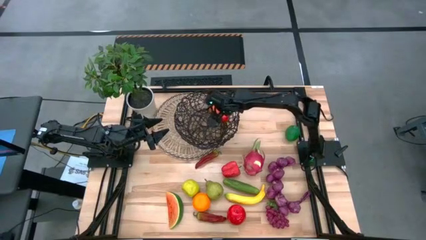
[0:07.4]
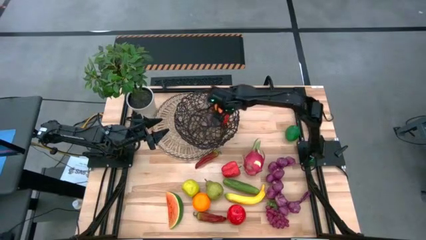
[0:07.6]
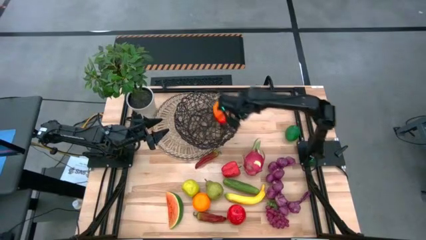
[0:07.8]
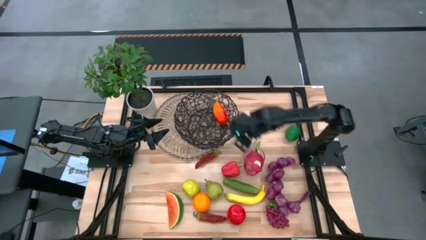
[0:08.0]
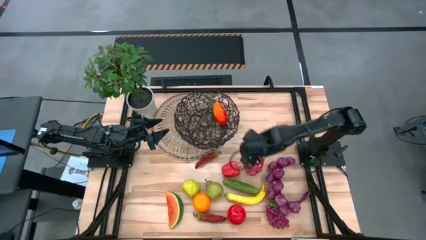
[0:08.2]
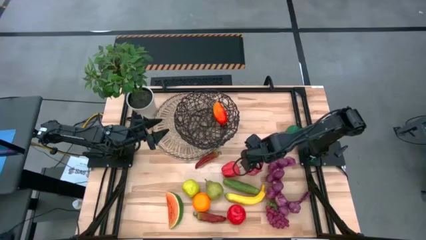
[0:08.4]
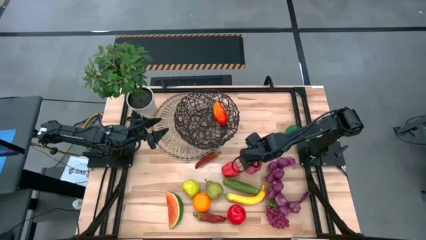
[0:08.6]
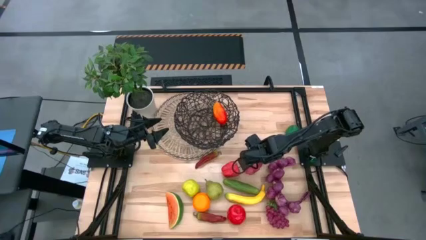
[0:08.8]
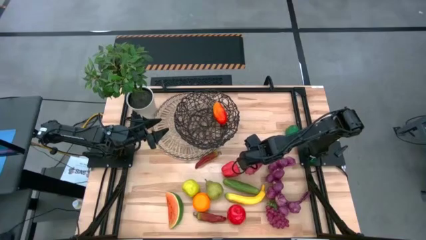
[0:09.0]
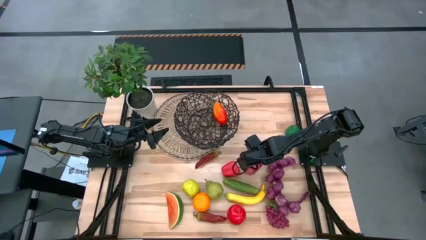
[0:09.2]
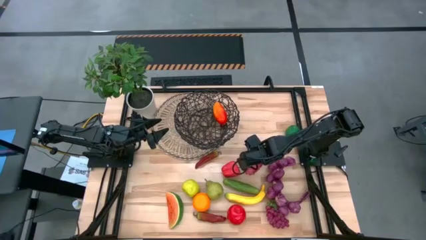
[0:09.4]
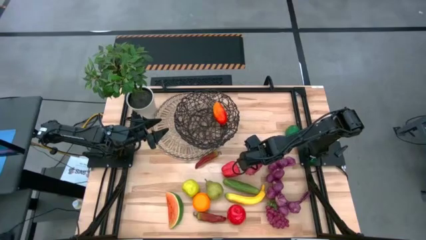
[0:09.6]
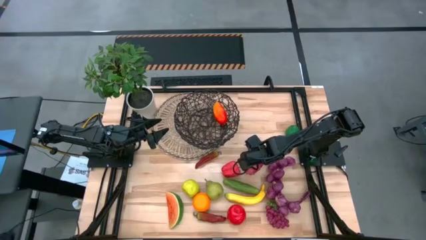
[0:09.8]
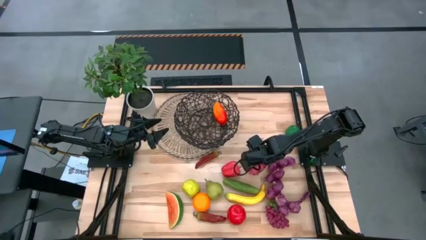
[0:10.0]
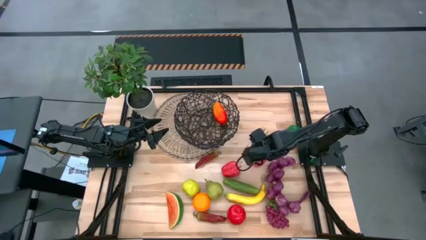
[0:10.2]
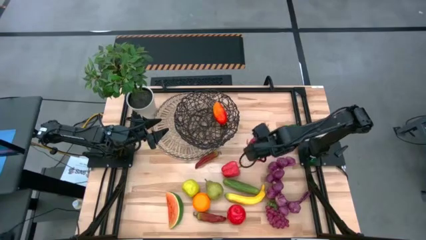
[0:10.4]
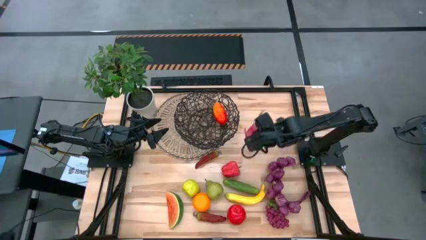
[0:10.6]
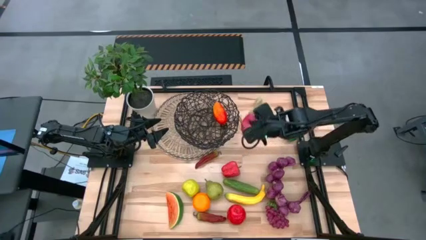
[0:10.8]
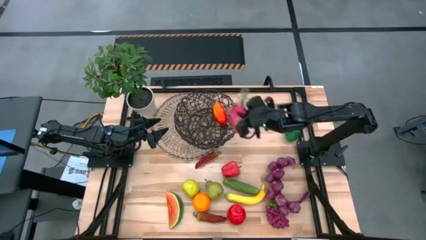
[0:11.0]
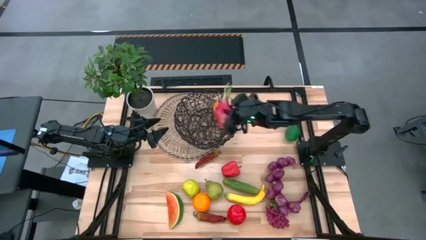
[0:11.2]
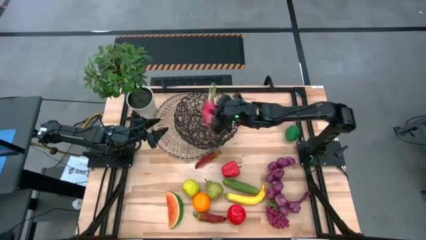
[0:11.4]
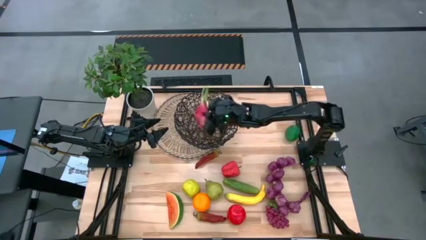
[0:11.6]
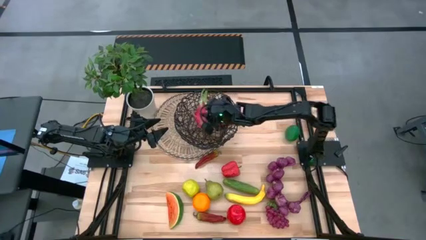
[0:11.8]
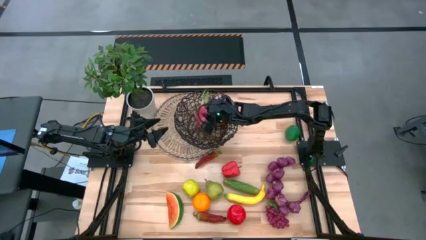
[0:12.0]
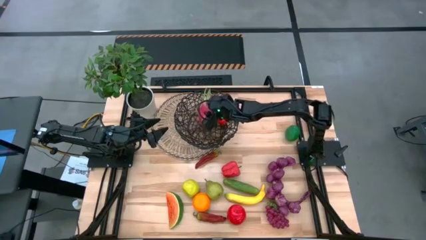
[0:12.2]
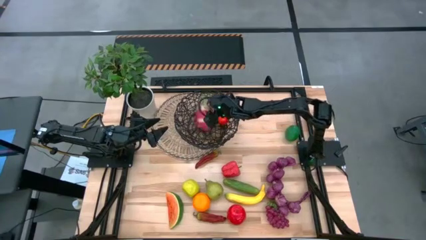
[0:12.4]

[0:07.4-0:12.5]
Task: Build produce basket
Put the dragon fruit into the wire basket

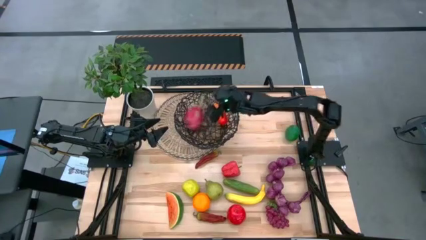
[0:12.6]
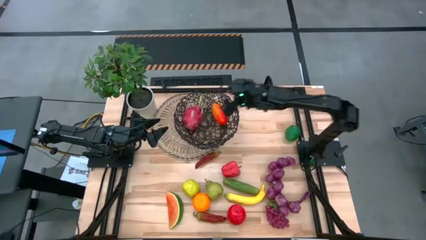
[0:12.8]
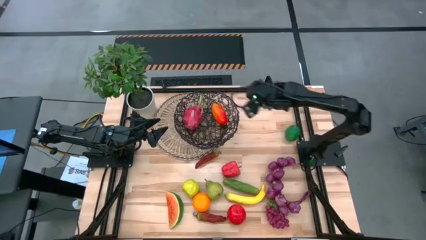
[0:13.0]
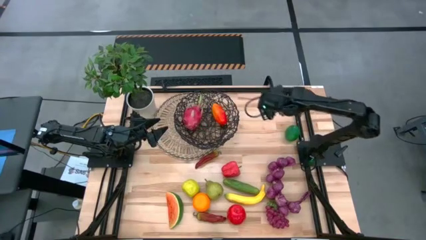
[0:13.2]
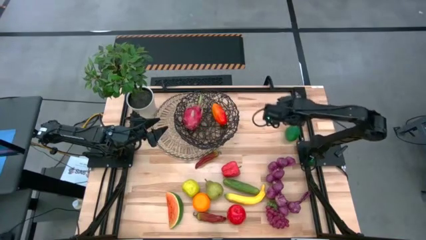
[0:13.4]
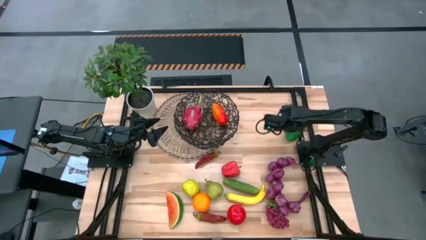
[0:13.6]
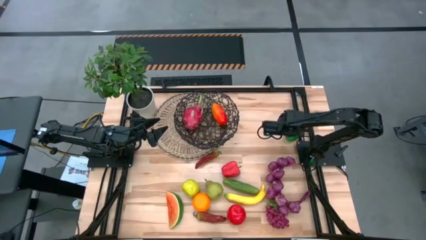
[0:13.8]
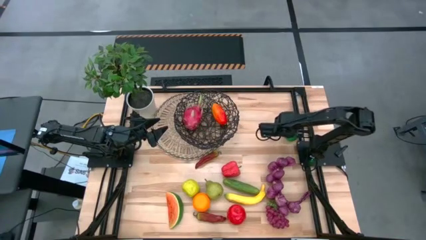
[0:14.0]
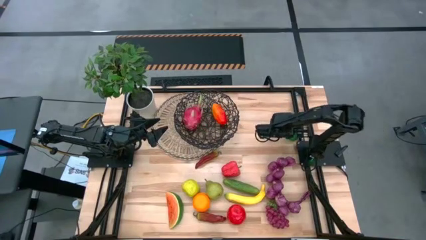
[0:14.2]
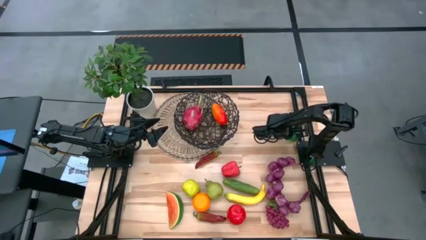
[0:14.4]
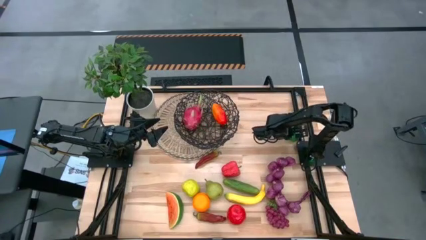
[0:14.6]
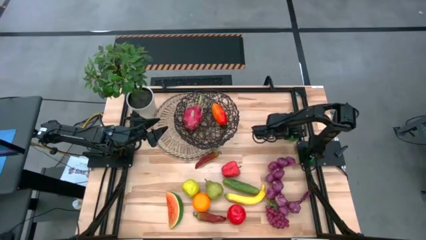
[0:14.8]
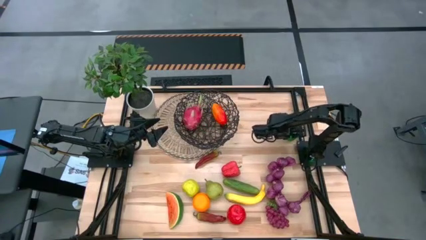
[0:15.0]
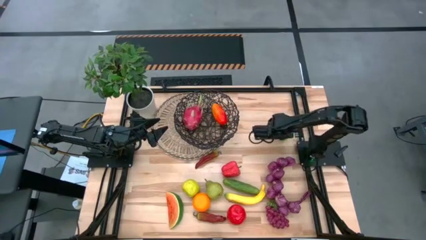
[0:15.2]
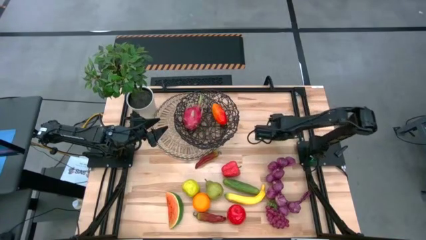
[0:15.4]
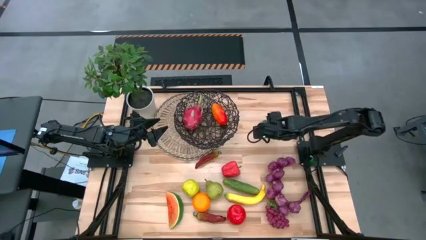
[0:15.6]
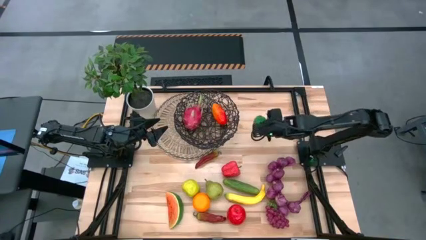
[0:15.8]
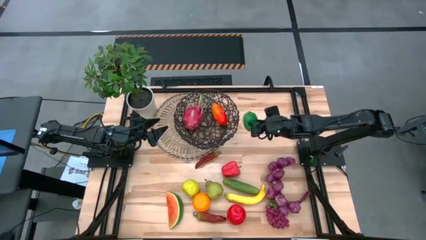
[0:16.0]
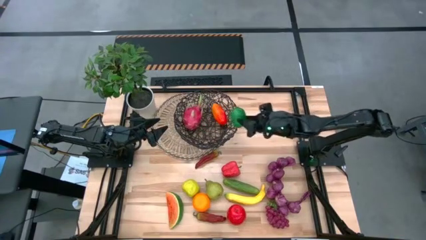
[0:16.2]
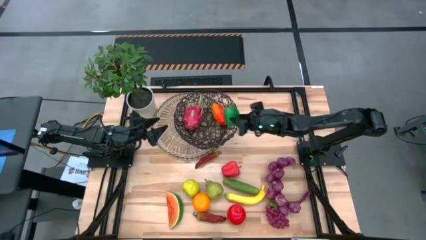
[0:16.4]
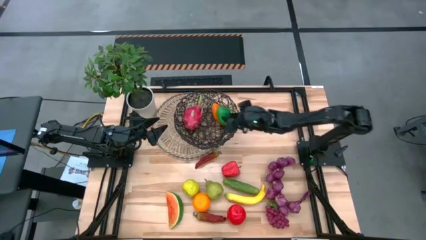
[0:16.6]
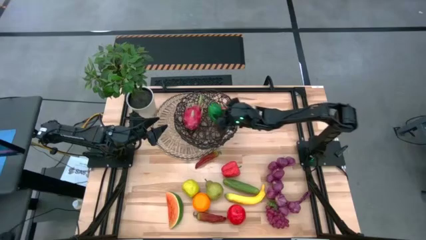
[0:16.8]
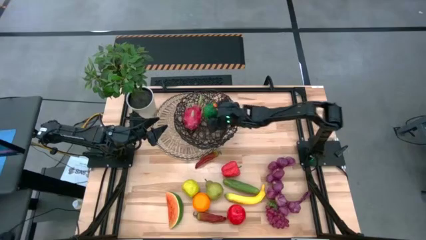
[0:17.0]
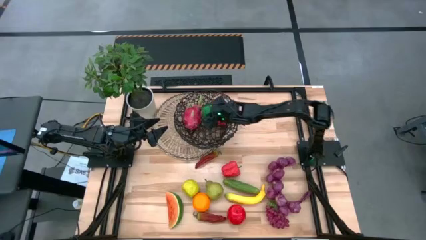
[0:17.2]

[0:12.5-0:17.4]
Put the lime into the wire basket

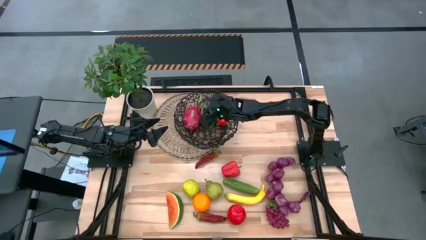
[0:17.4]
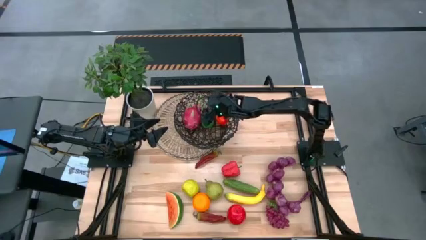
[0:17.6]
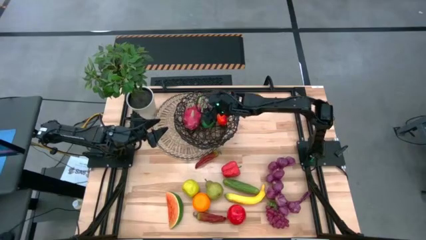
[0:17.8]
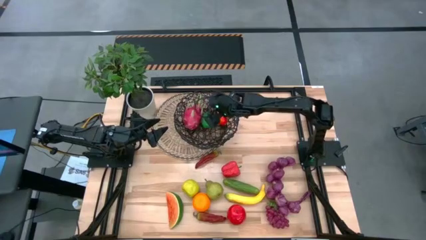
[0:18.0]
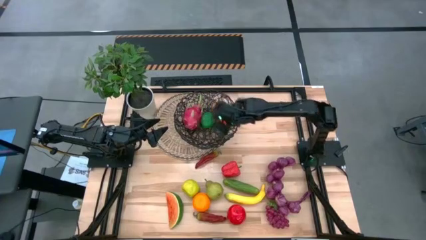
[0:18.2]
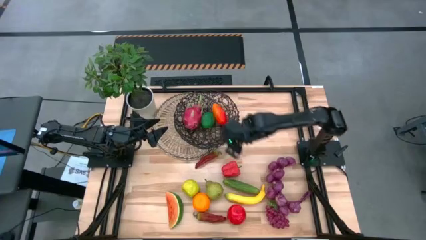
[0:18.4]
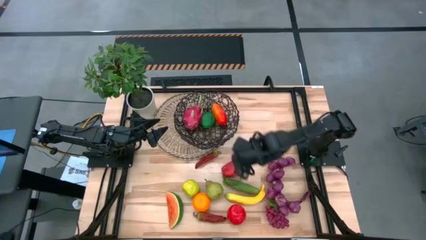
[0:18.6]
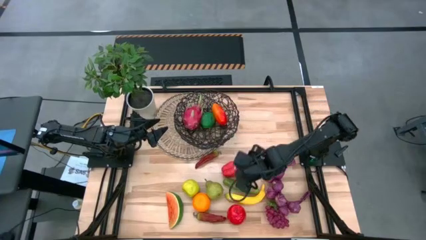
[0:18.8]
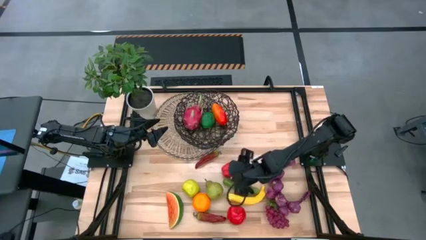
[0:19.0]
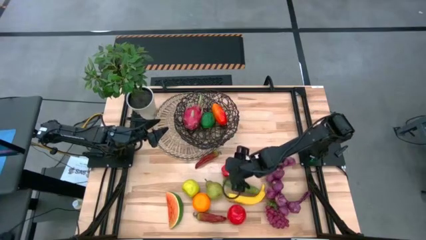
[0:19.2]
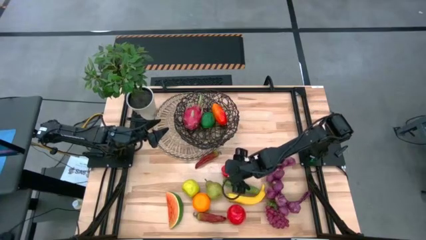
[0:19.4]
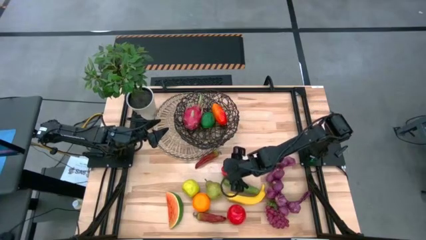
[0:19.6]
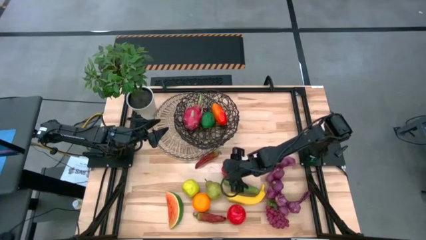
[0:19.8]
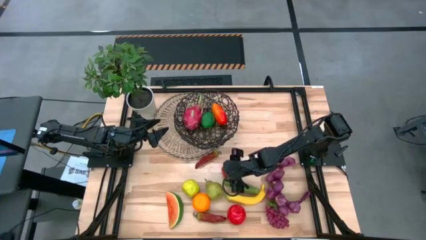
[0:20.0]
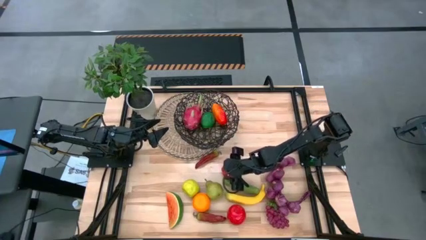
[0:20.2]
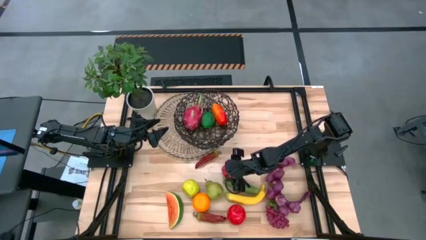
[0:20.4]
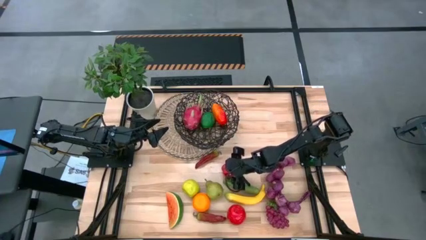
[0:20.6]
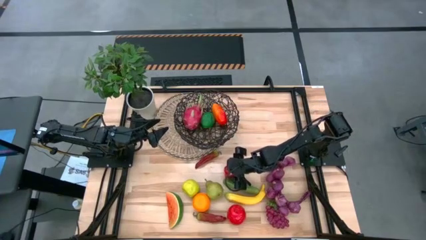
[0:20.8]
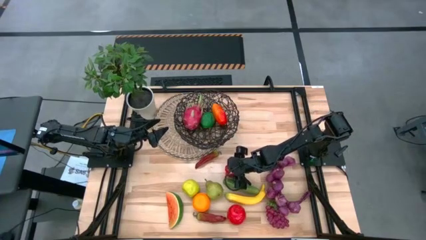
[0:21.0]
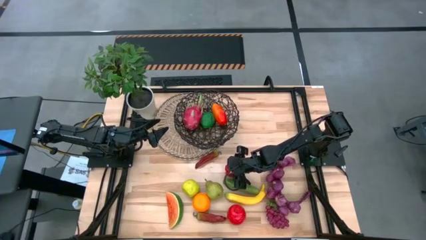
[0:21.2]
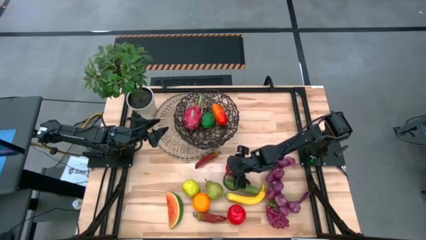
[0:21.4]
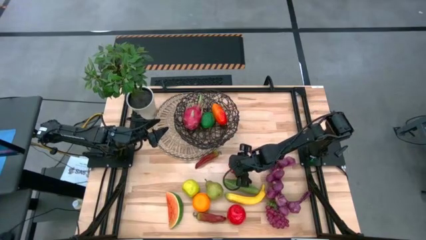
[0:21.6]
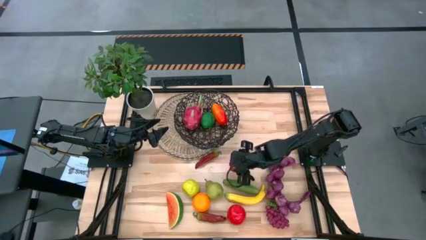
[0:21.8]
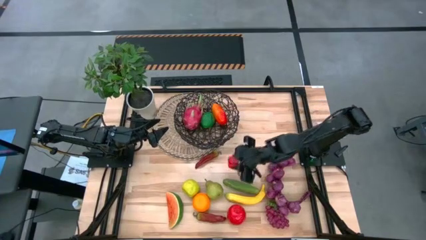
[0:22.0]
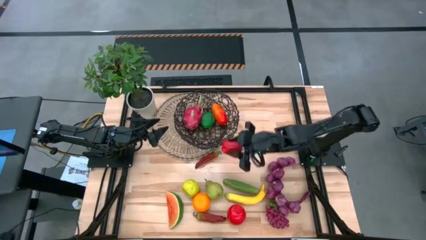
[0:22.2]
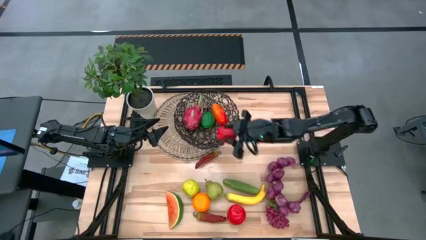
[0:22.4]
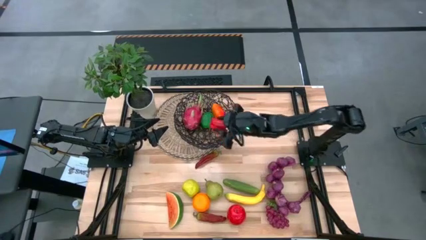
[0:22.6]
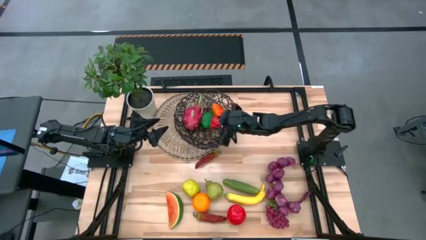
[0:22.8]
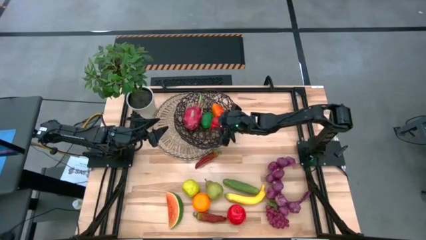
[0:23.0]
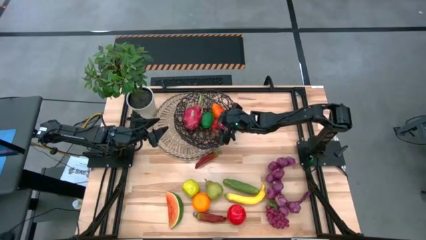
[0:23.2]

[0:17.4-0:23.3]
Put the red bell pepper into the wire basket
